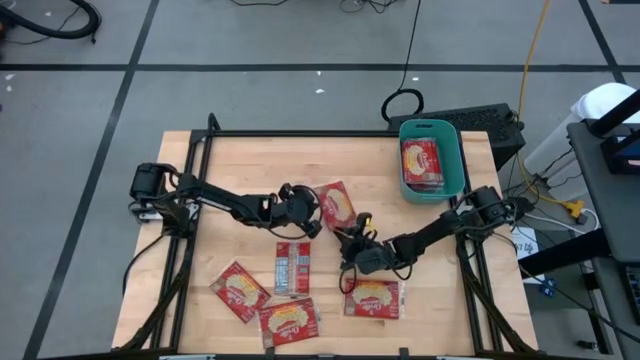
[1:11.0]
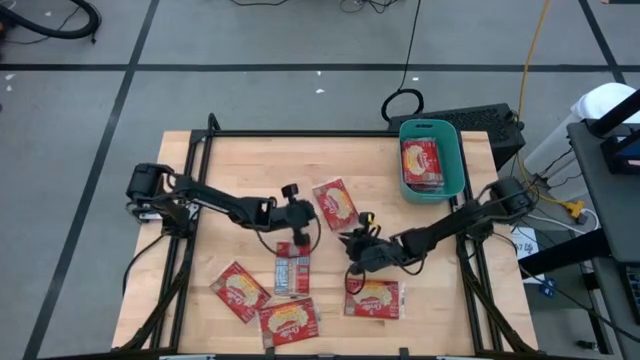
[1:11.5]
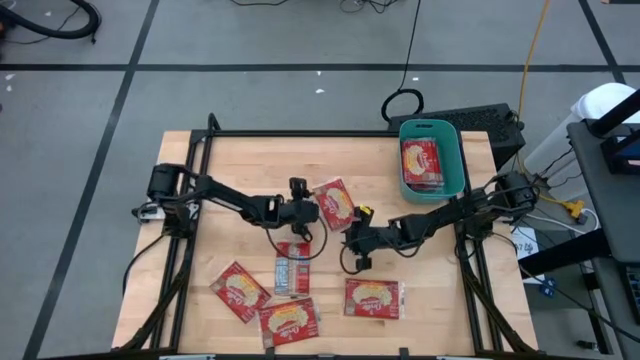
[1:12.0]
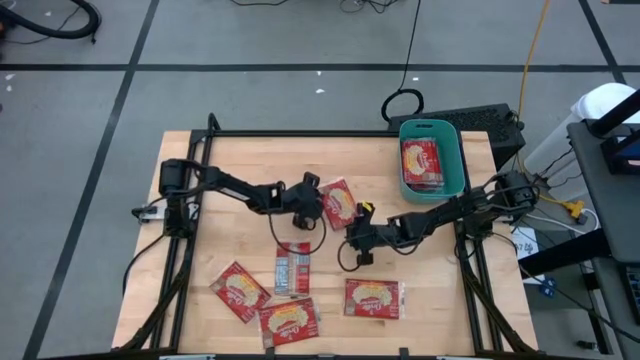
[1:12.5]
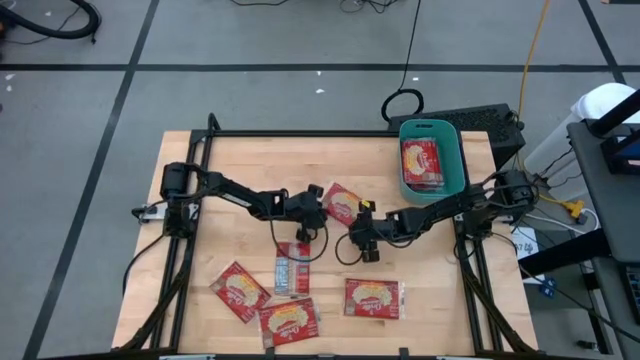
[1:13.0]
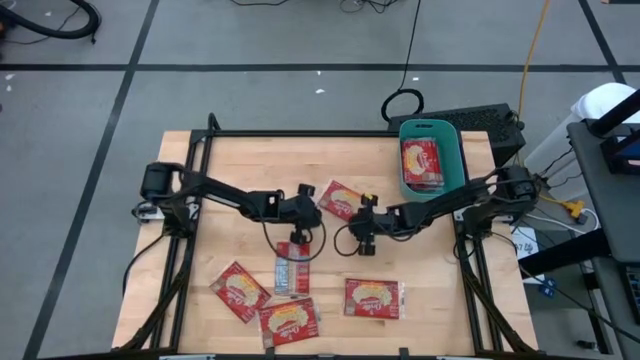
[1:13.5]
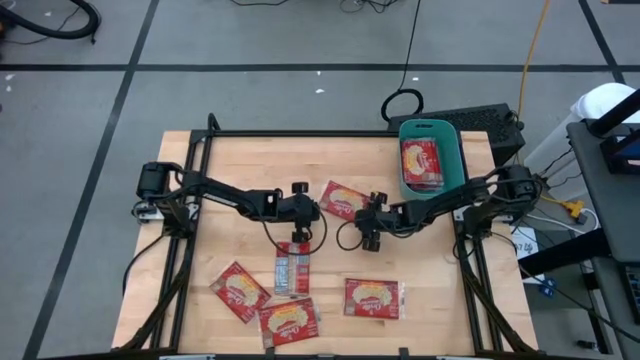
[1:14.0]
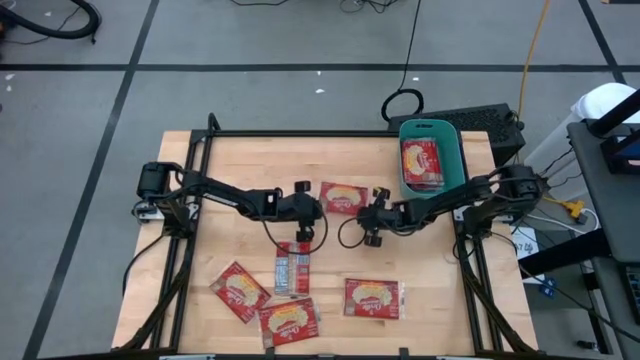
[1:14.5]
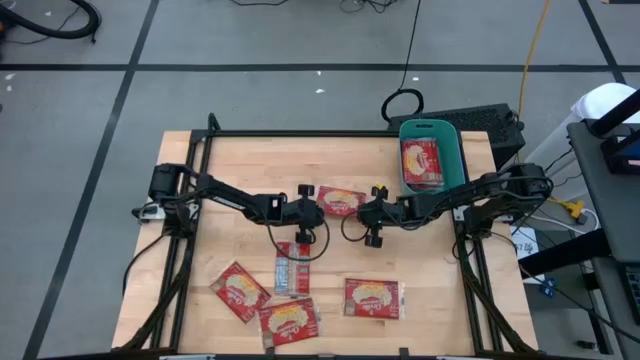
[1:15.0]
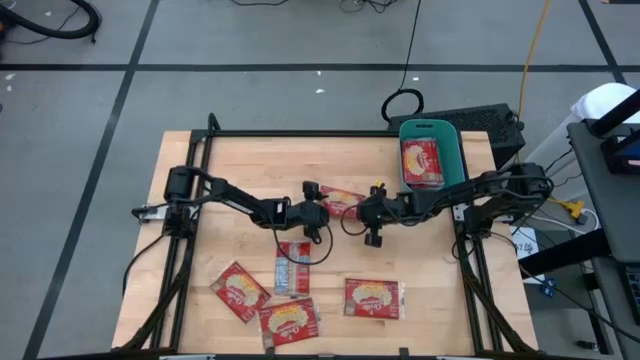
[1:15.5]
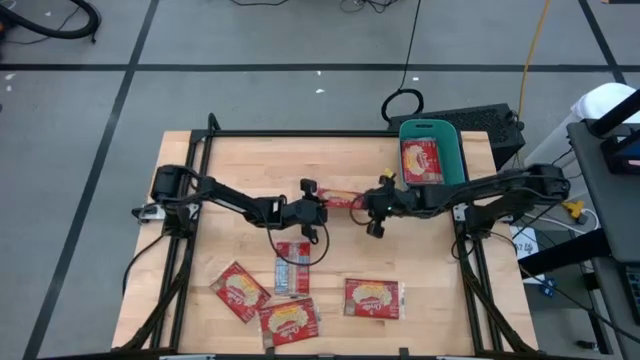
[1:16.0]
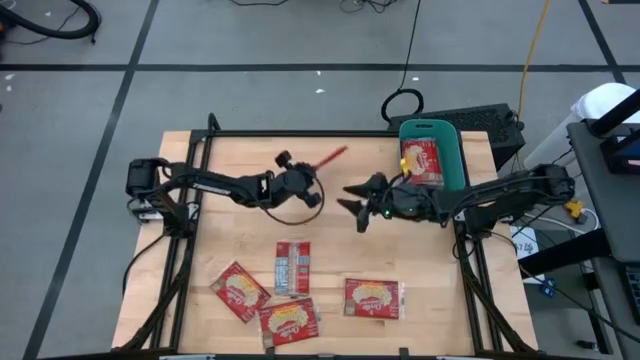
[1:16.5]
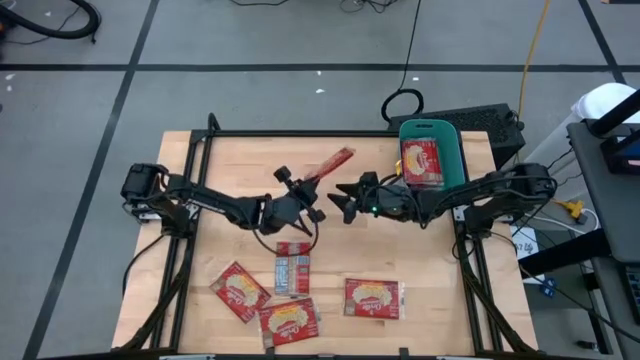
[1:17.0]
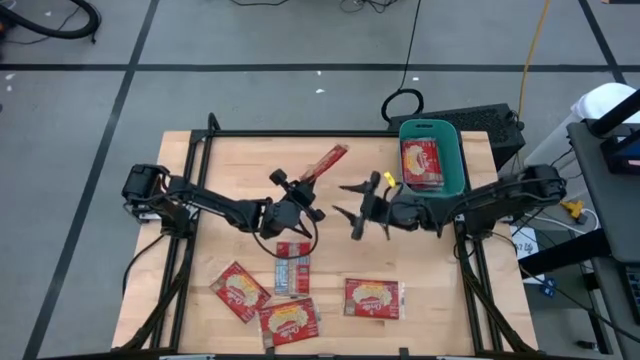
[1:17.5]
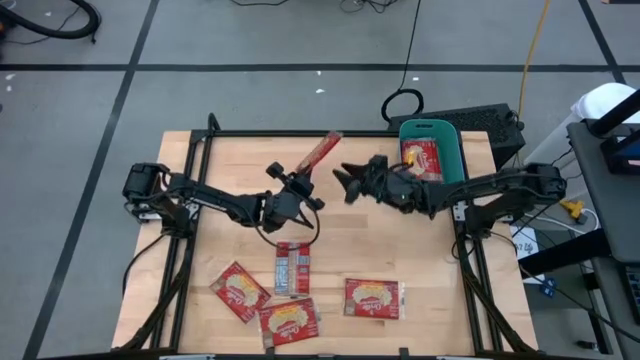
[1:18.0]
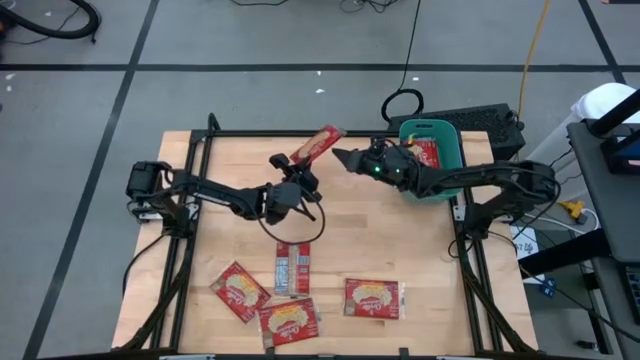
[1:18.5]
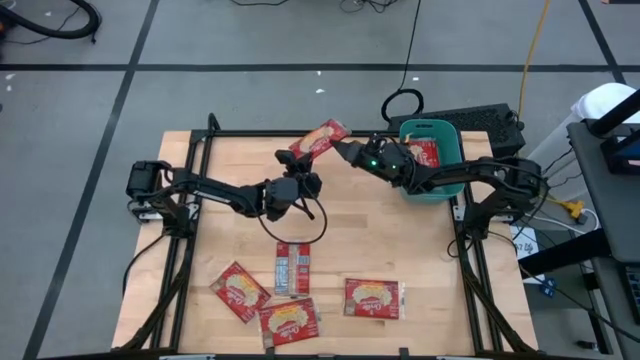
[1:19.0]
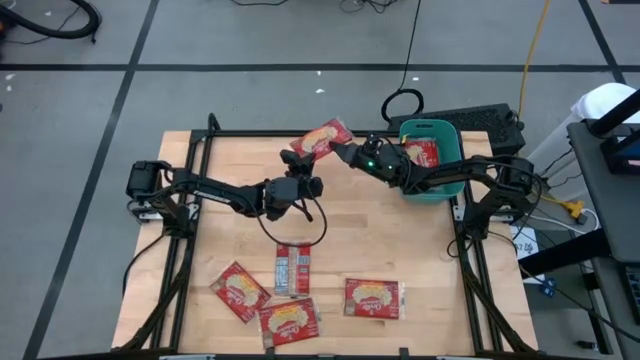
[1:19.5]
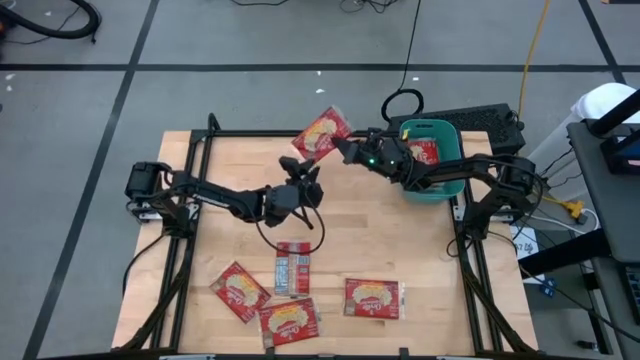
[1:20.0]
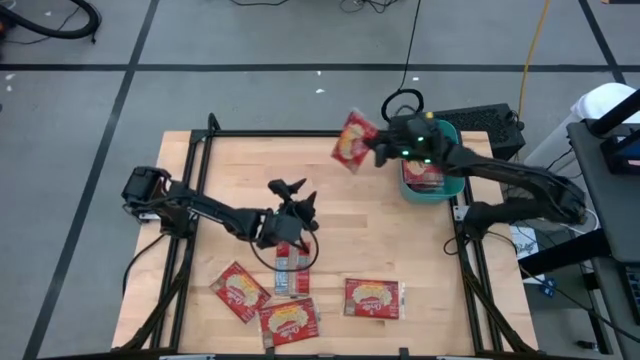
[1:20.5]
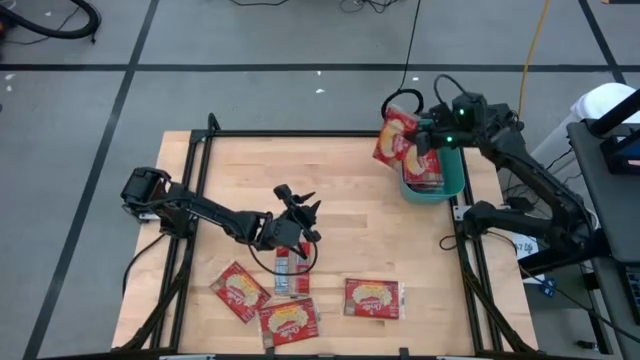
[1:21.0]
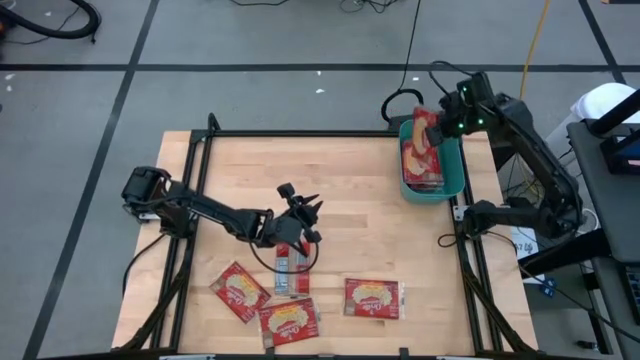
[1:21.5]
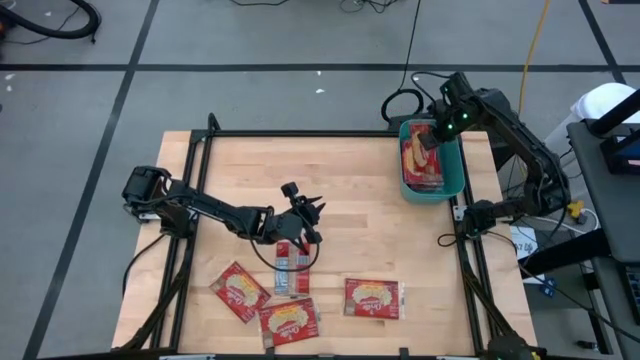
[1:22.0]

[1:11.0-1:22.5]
Task: Sort popcorn bags into baskets
Put the red popcorn bag into the green bin

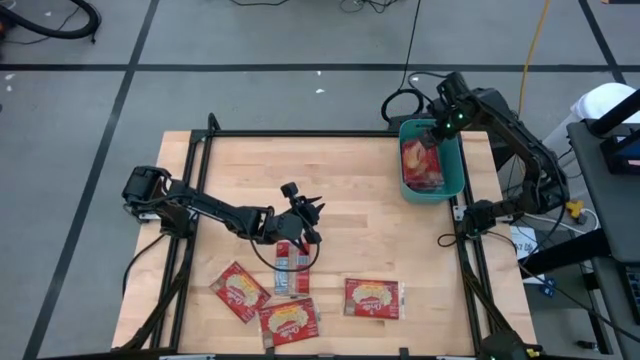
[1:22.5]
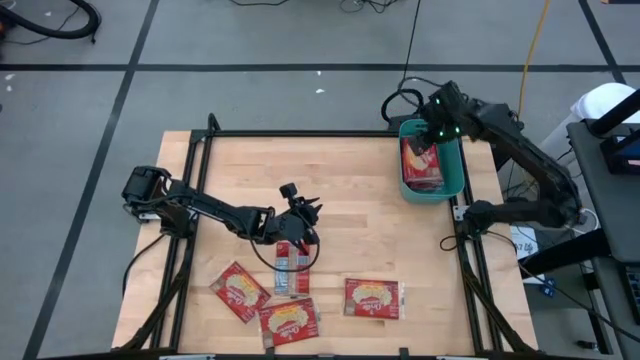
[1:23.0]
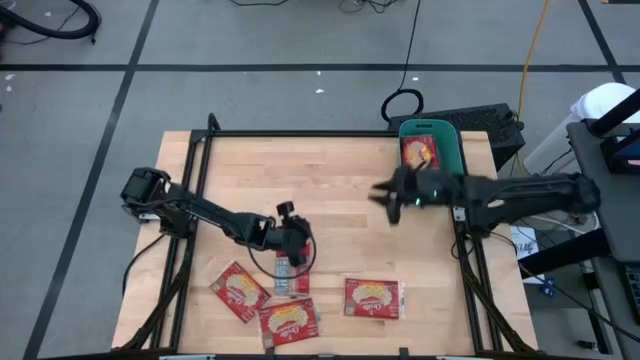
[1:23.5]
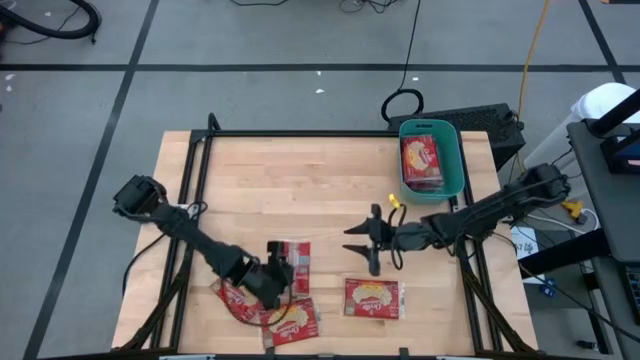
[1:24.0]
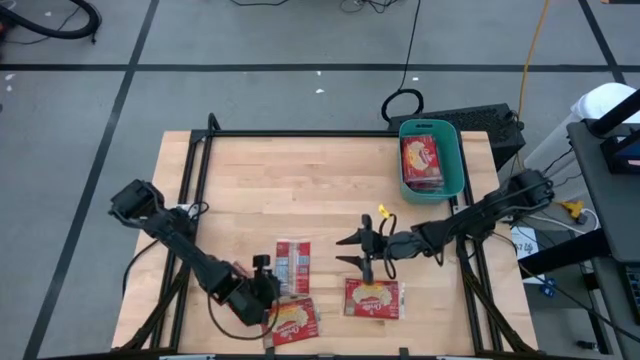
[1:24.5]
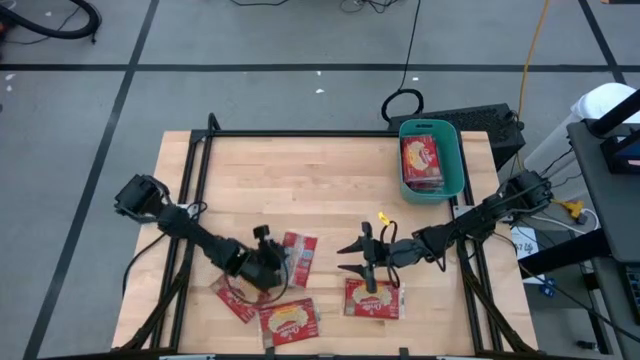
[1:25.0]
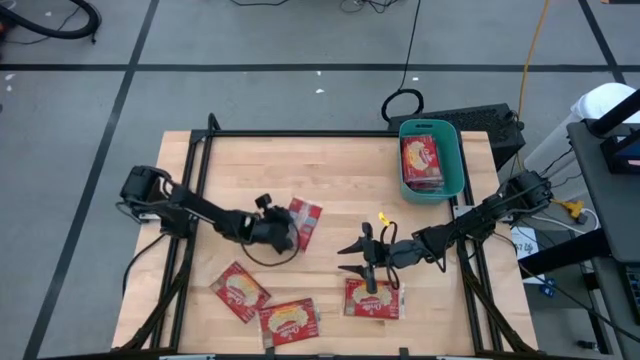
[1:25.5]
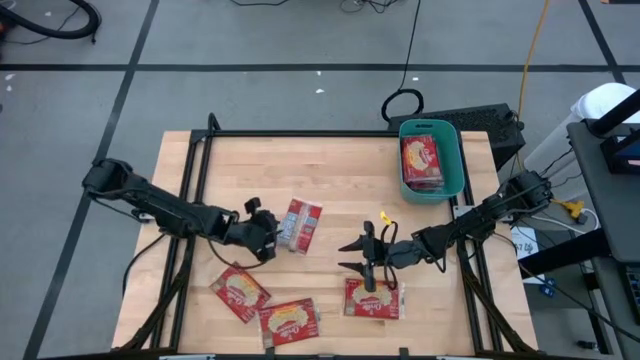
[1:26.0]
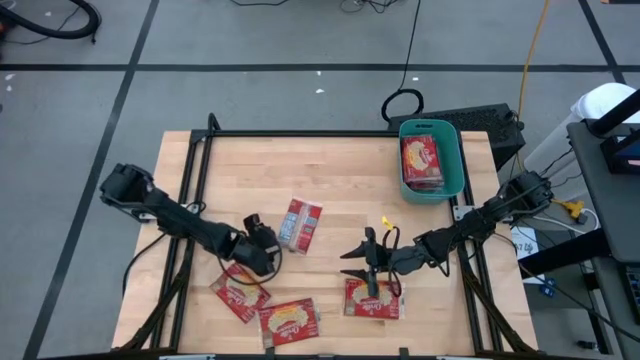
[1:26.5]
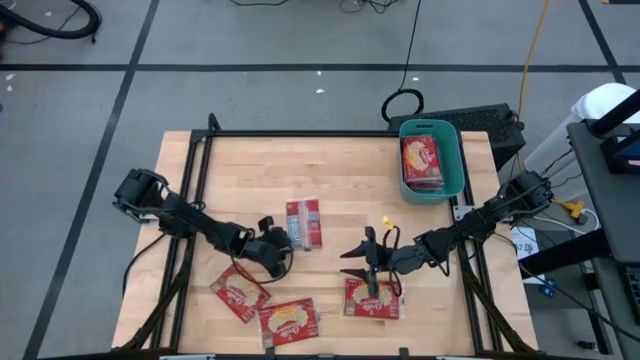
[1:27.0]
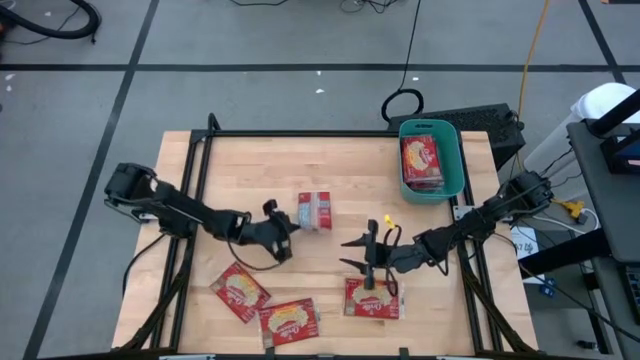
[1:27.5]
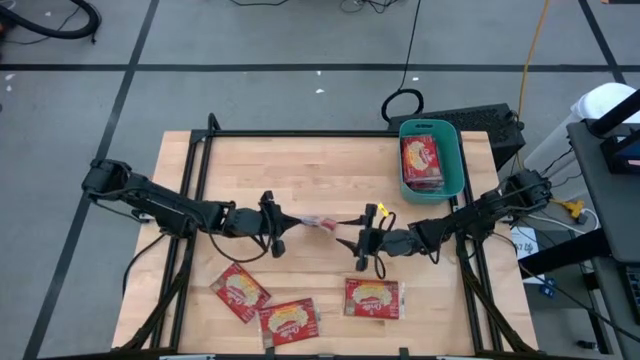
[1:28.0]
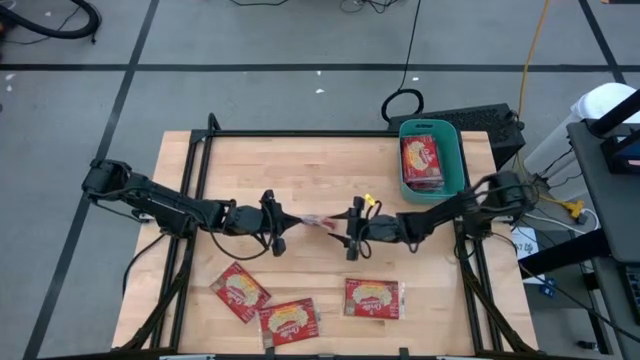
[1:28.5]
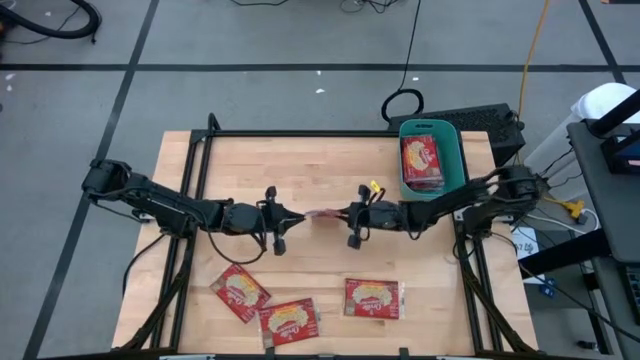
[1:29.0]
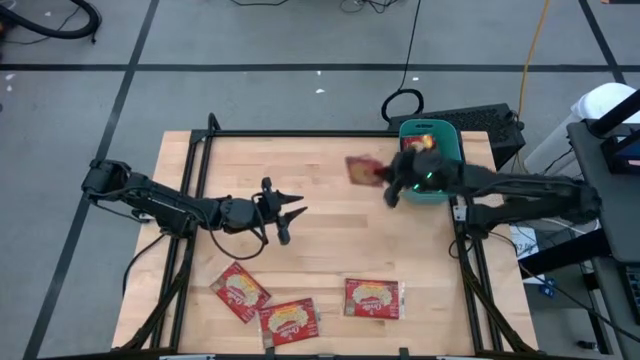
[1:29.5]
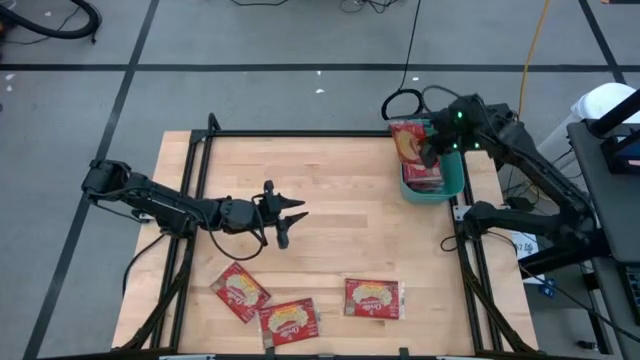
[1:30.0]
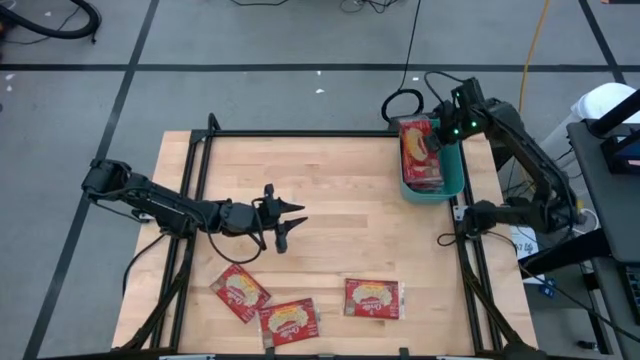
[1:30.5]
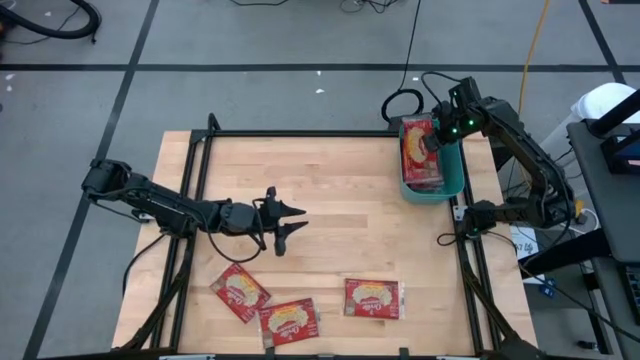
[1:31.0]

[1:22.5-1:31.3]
Put the red popcorn bag into the green bin

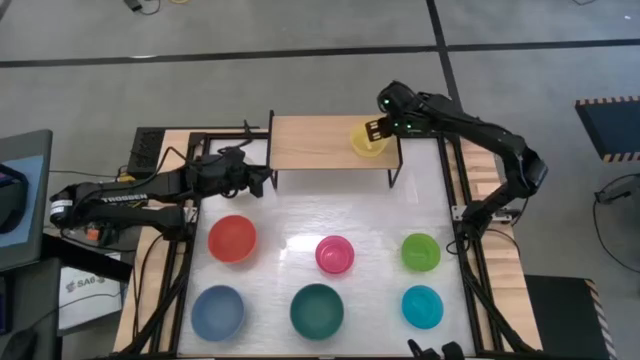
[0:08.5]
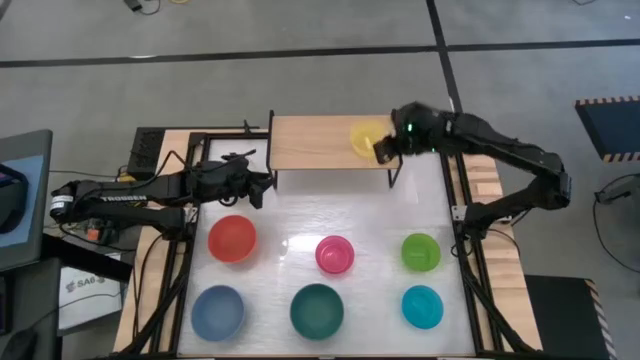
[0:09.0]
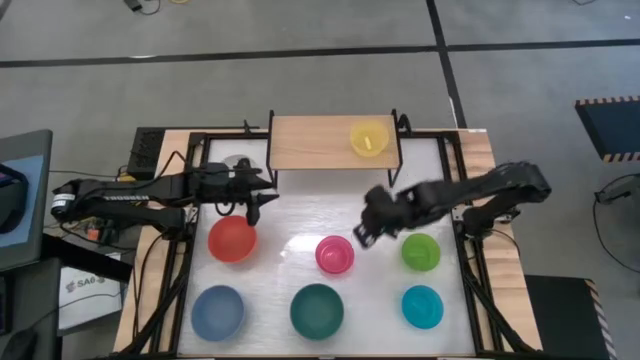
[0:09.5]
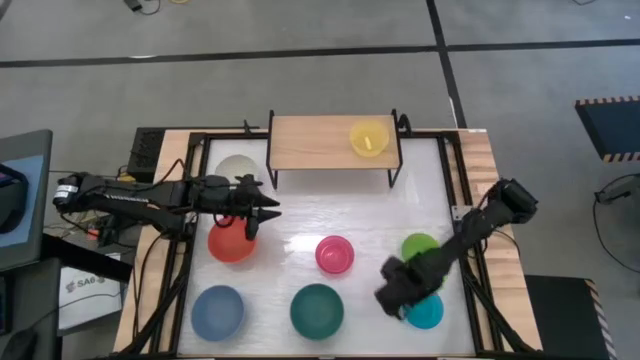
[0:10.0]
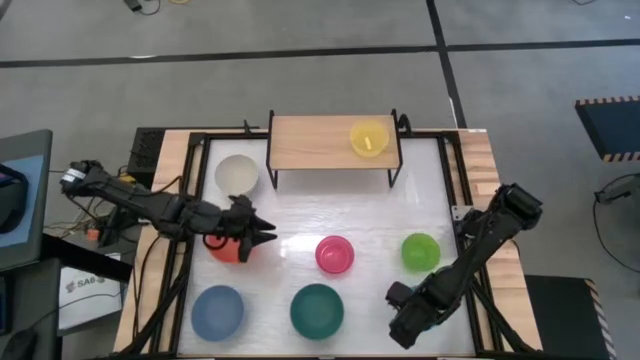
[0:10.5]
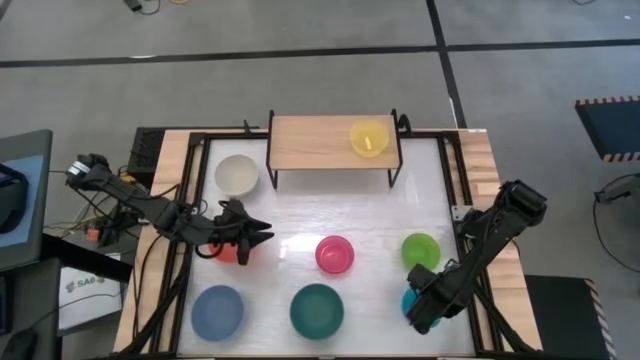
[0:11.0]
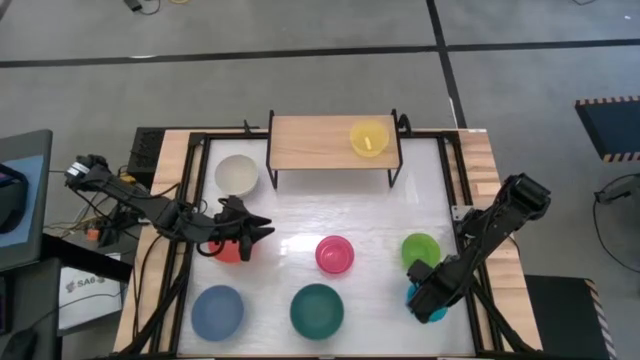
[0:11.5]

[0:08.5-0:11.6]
Task: Place and stack bowls onto a shelf
Stack the light blue bowl on top of the yellow bowl on the shelf
